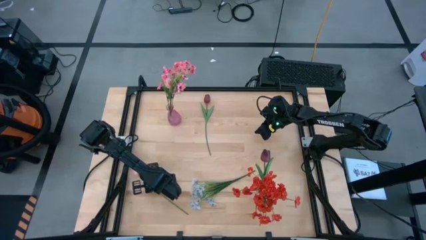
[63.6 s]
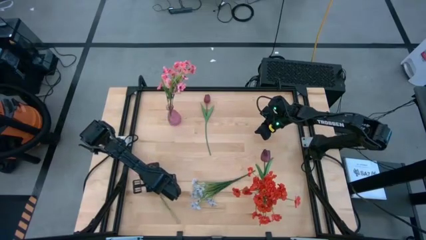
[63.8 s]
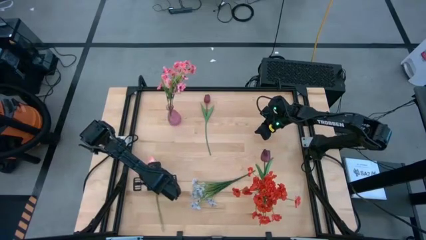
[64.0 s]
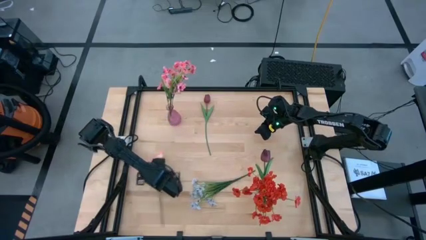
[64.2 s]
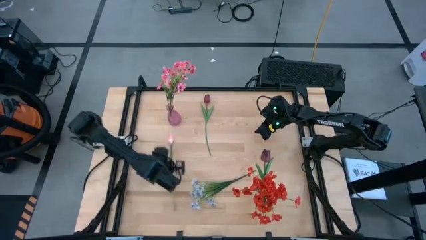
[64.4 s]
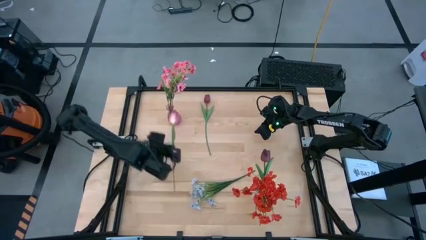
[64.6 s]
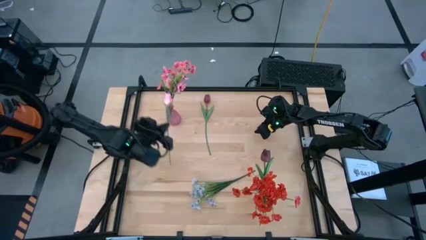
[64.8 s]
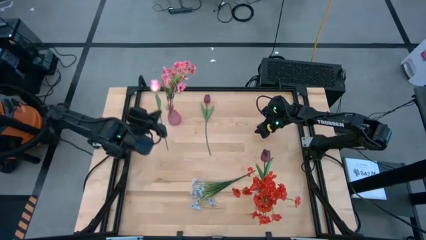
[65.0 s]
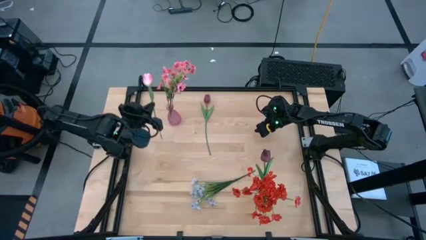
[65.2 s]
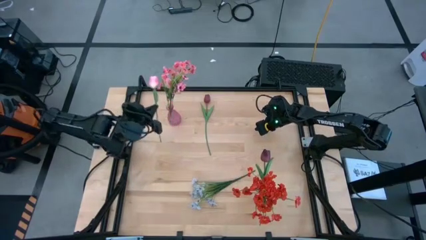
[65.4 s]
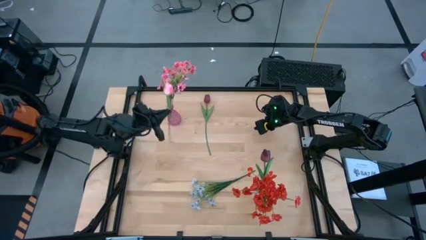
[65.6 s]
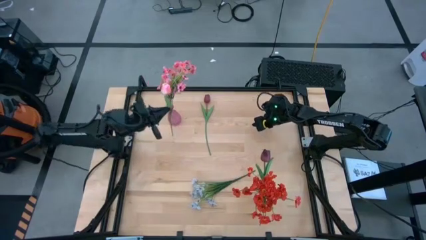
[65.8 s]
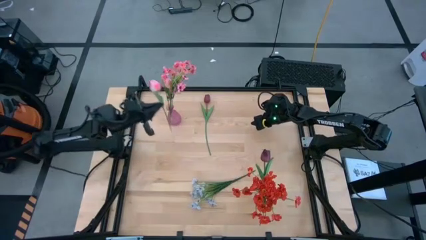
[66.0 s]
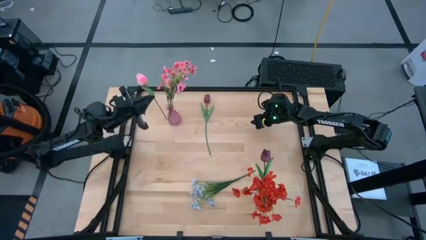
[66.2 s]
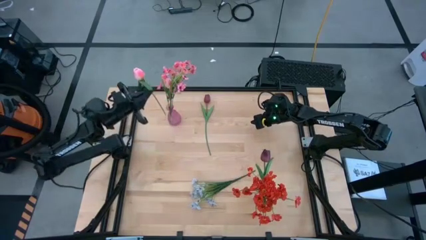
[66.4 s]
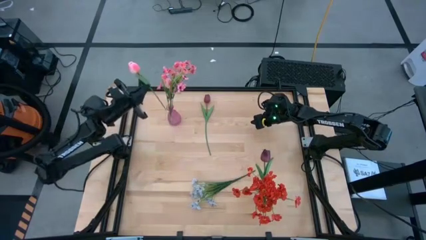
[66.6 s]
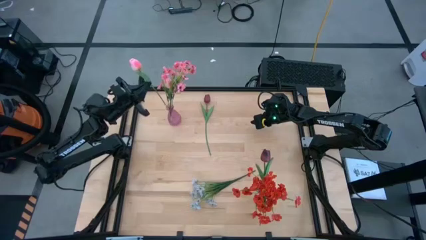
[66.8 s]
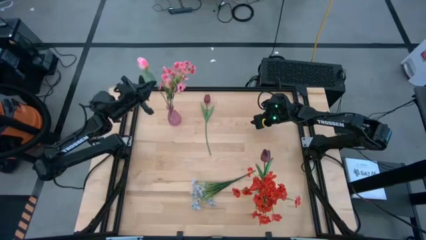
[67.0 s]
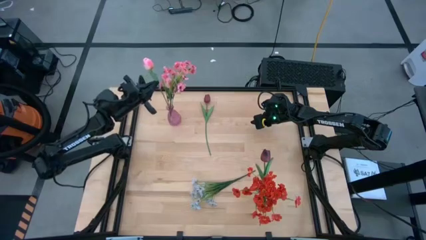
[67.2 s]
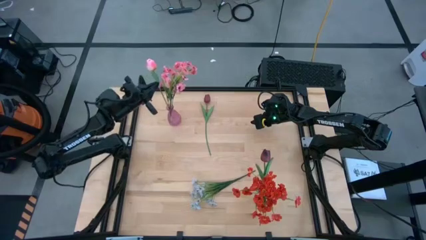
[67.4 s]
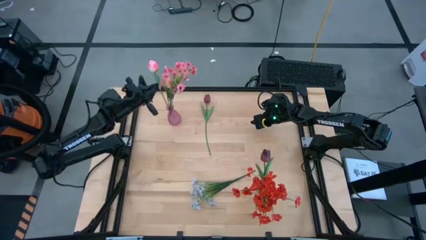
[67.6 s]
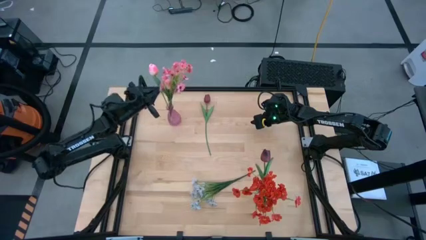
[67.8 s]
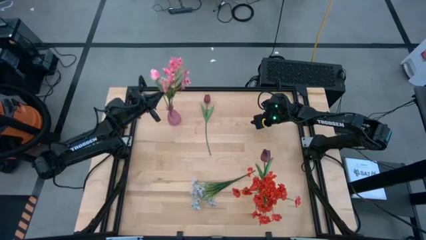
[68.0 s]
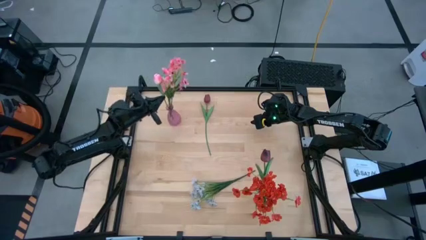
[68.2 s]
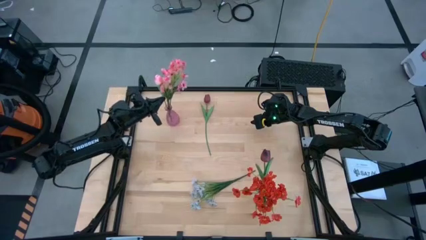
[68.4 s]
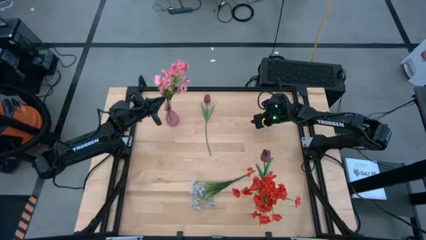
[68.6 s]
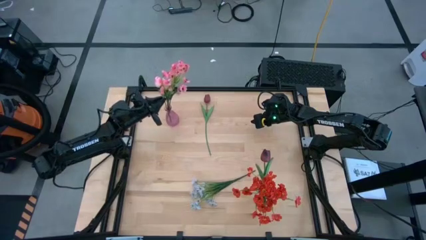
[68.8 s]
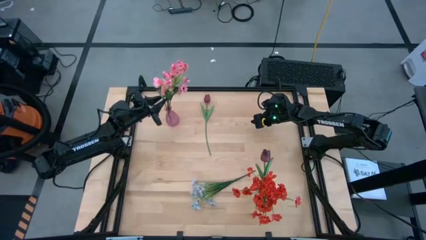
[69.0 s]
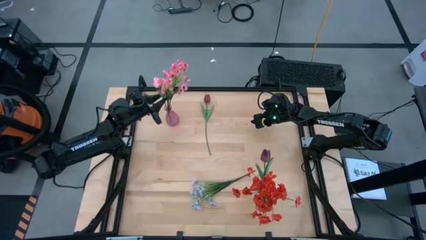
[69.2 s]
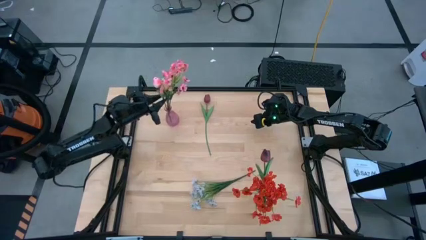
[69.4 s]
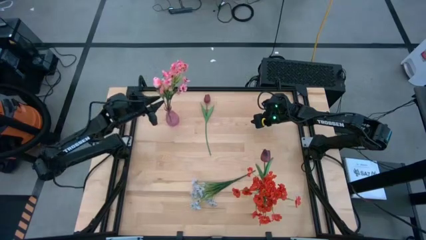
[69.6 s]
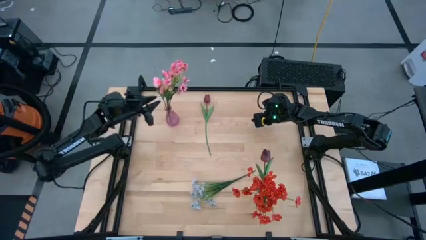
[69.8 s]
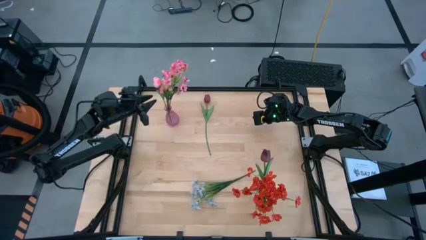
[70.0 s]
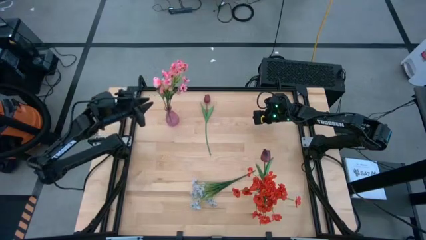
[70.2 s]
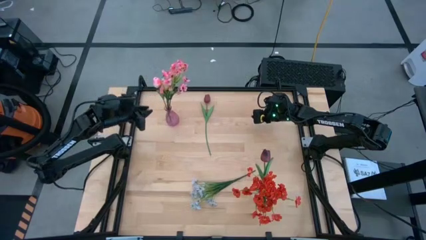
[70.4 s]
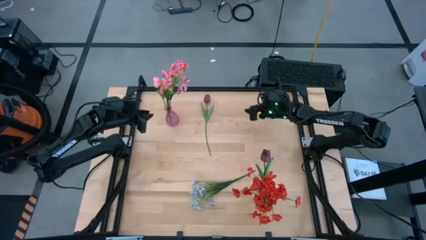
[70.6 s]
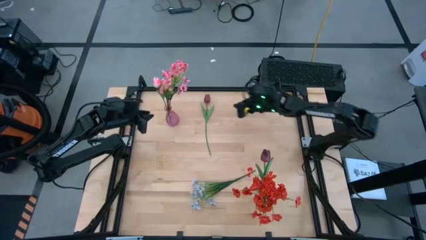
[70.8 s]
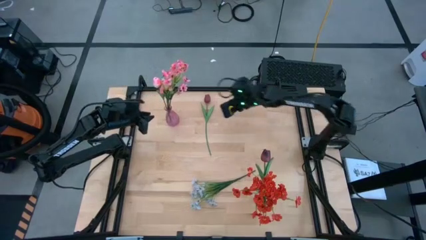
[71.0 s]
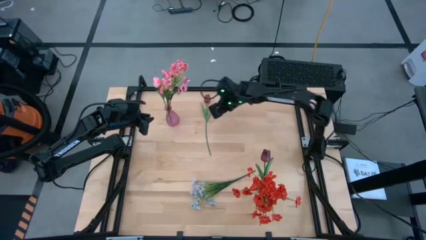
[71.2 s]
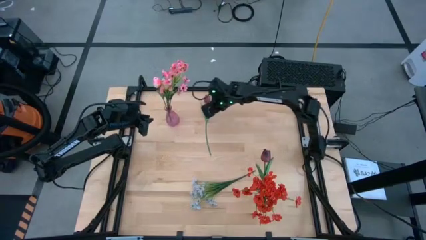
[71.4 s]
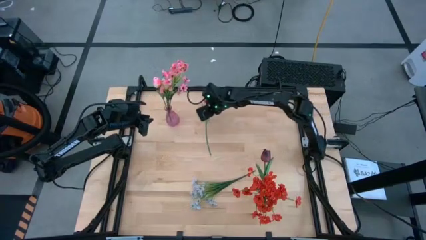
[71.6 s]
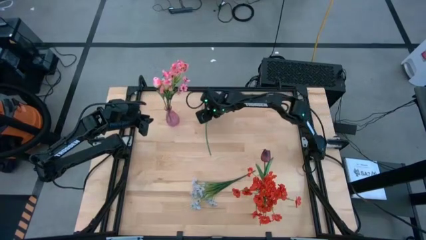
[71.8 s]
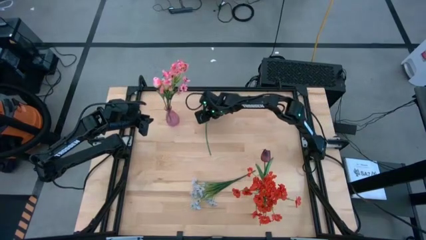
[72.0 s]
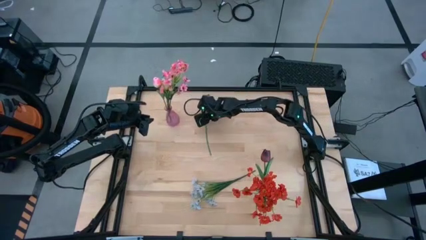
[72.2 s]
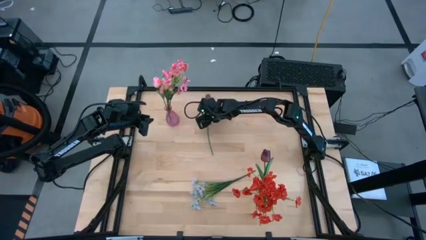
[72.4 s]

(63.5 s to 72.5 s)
Task: Sort flowers into vase by color
Put the pink tulip flower into the pink vase

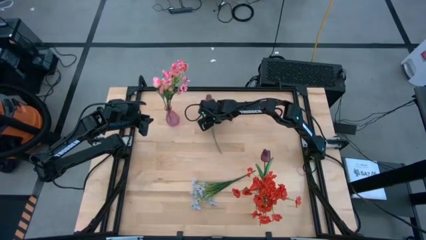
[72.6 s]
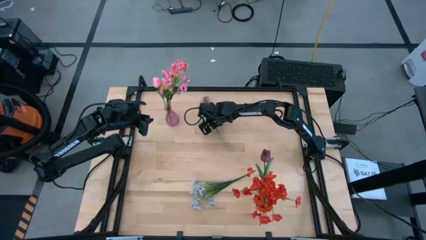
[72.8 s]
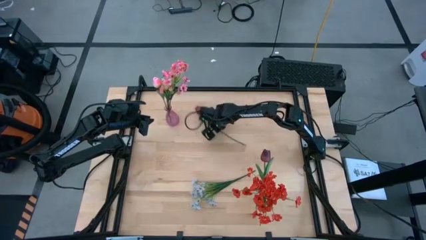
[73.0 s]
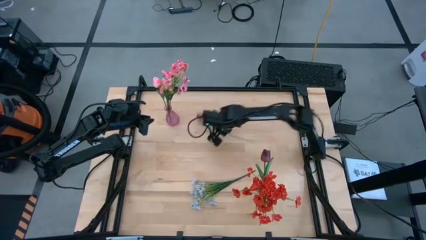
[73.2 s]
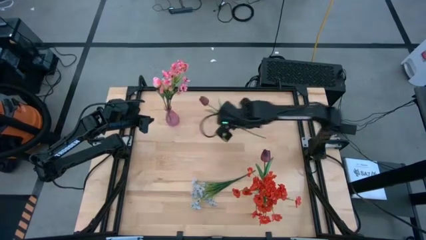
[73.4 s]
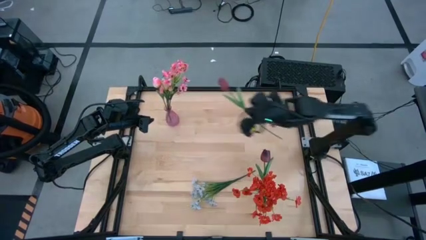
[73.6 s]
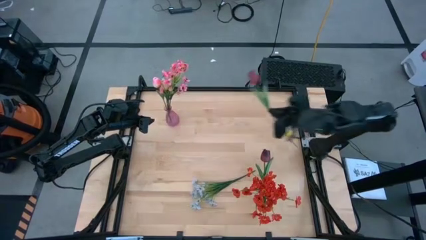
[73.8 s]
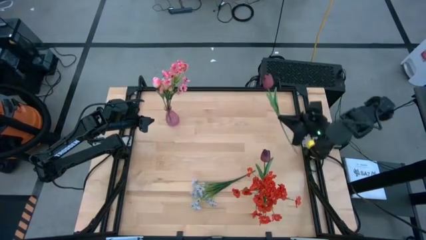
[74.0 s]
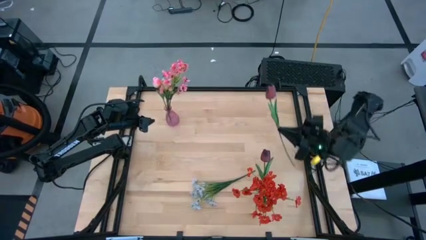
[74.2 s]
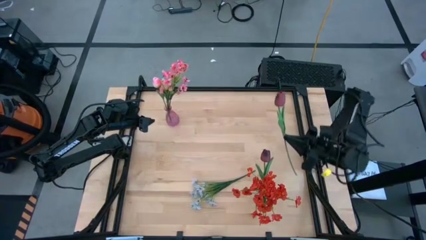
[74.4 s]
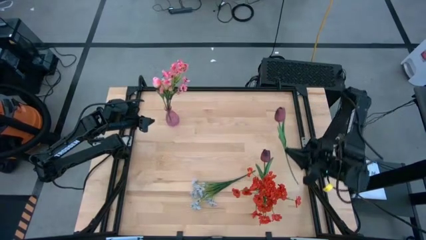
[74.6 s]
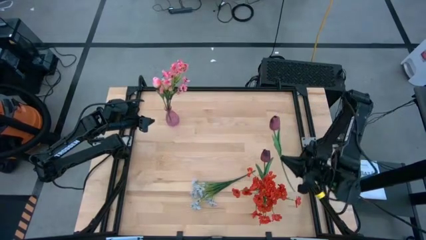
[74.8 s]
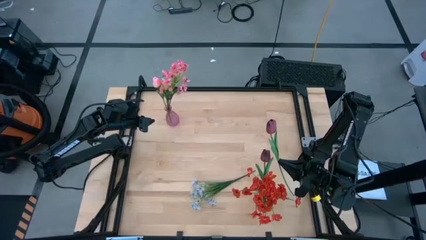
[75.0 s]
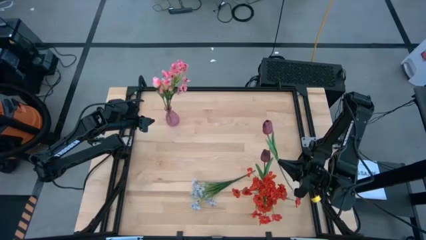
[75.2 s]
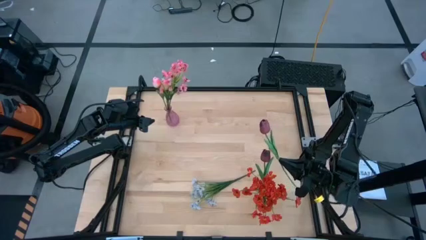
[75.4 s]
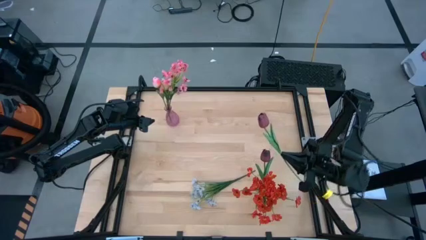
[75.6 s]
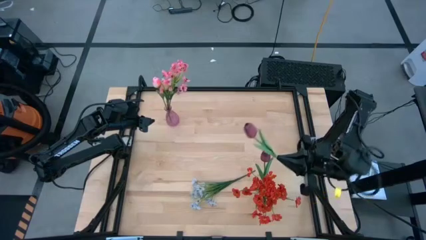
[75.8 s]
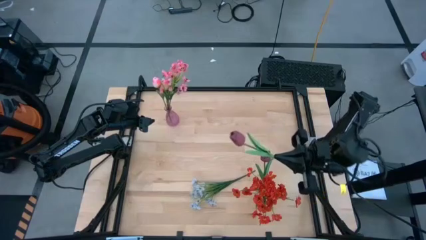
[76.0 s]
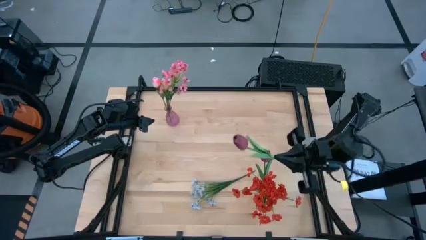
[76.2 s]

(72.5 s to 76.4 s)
Put the red tulip into the transparent vase

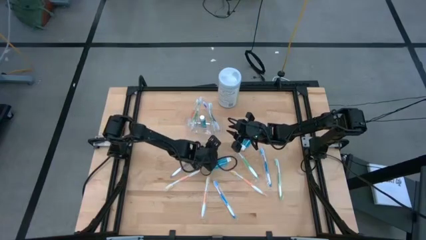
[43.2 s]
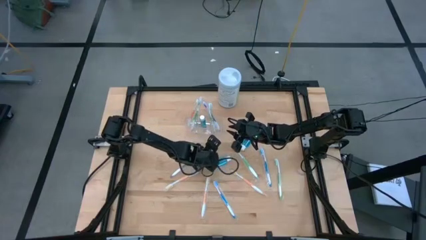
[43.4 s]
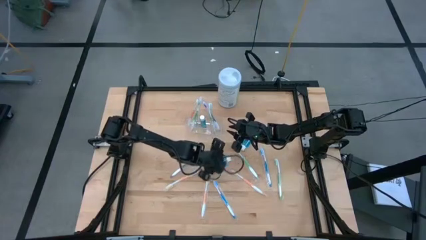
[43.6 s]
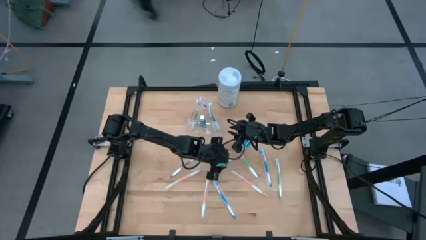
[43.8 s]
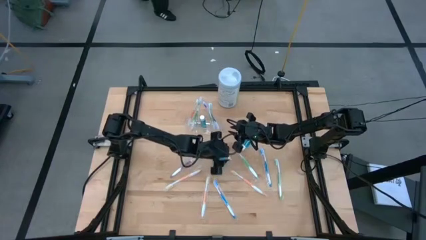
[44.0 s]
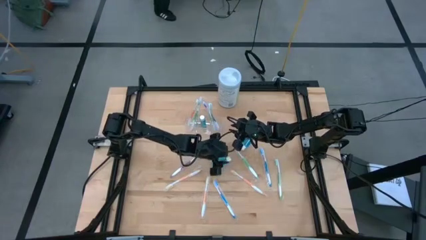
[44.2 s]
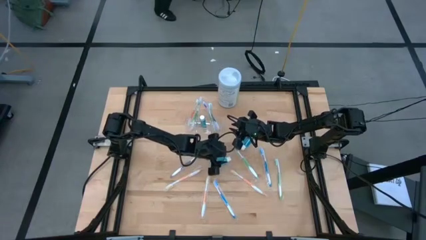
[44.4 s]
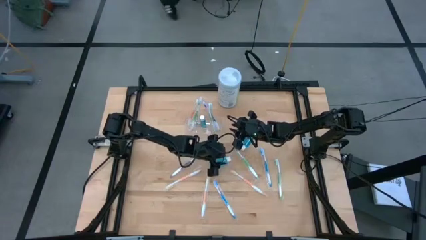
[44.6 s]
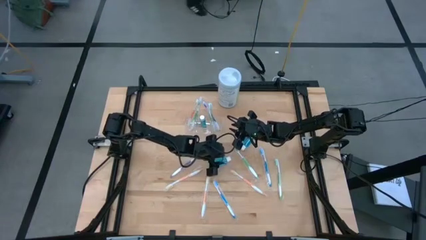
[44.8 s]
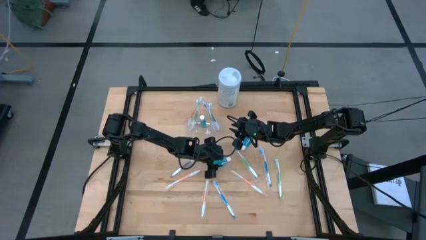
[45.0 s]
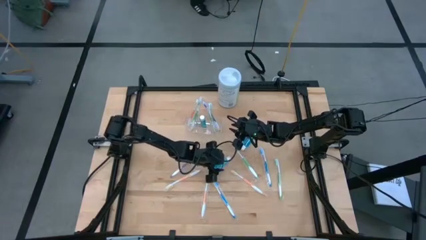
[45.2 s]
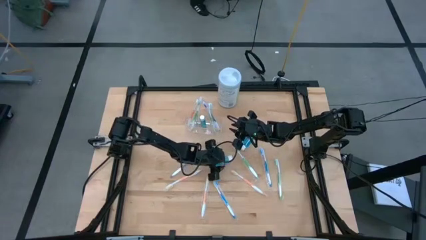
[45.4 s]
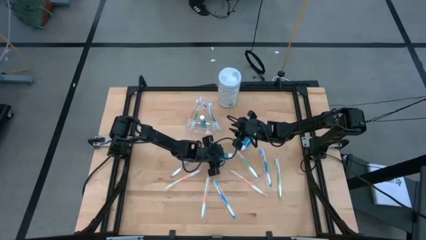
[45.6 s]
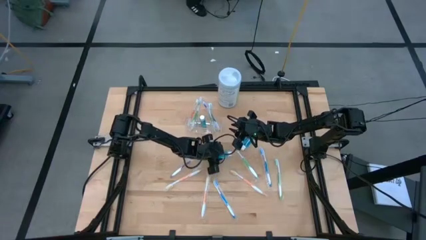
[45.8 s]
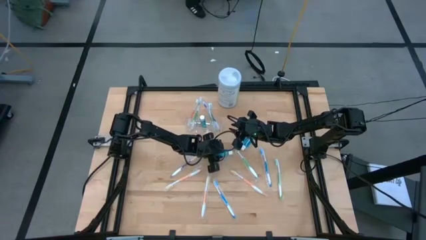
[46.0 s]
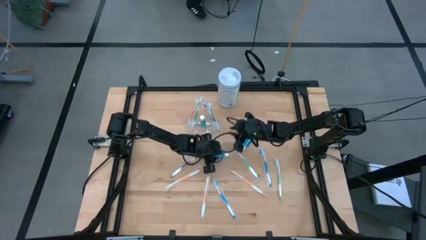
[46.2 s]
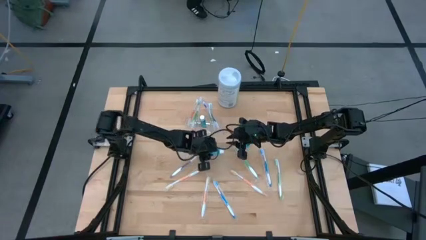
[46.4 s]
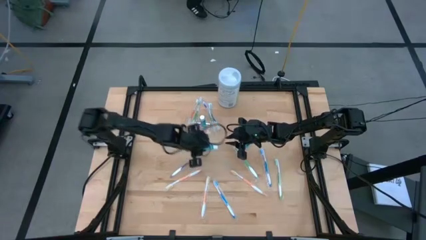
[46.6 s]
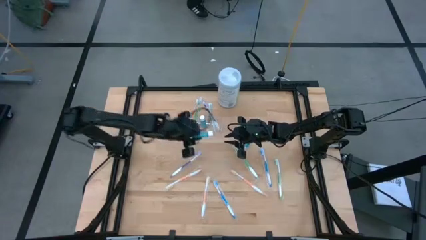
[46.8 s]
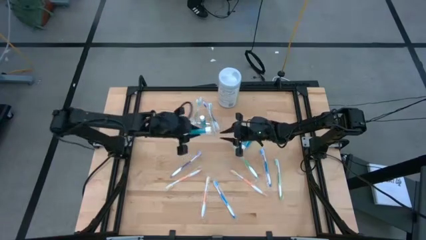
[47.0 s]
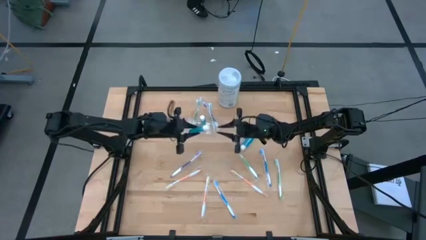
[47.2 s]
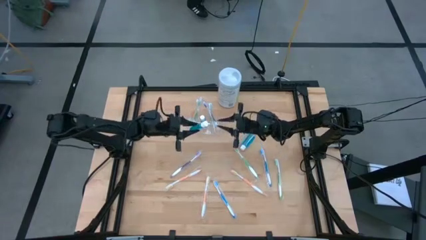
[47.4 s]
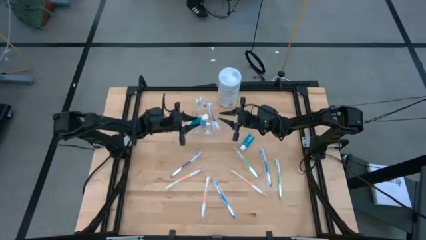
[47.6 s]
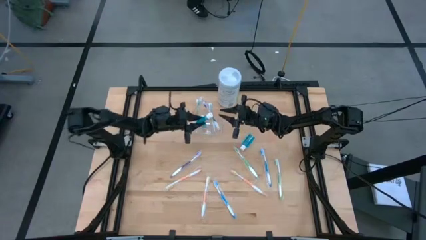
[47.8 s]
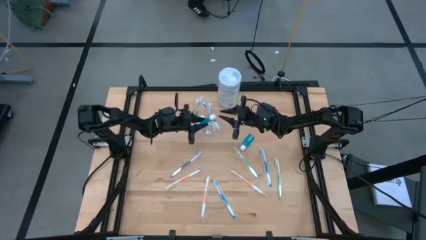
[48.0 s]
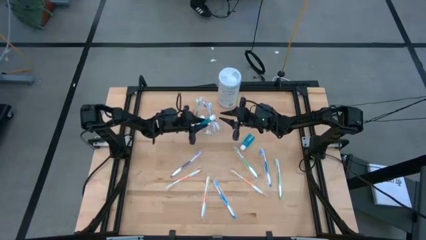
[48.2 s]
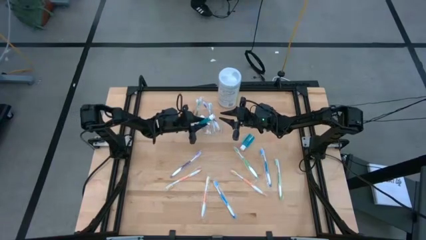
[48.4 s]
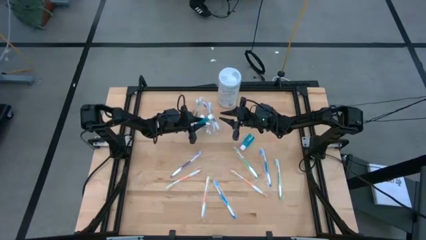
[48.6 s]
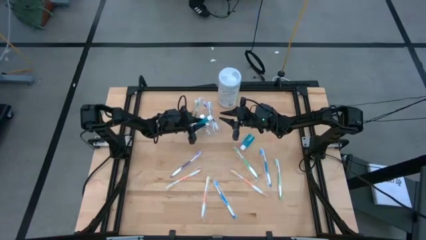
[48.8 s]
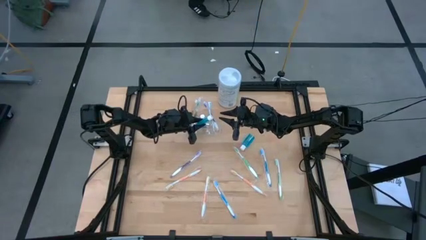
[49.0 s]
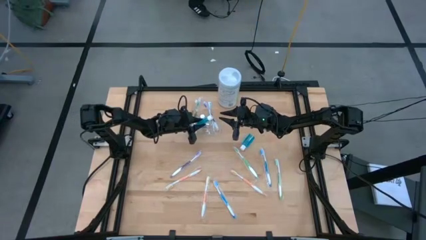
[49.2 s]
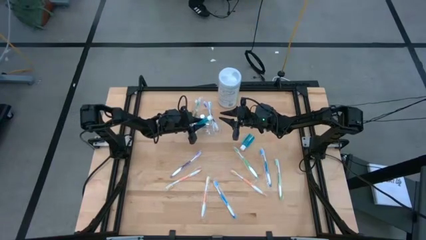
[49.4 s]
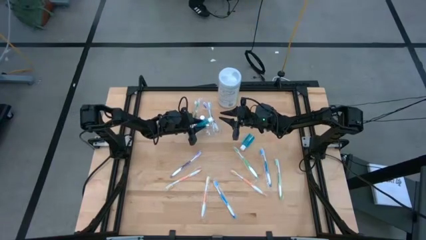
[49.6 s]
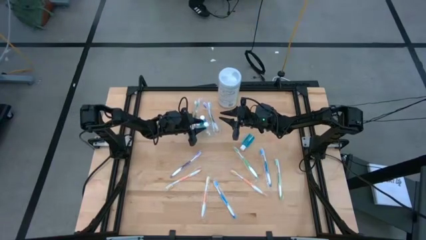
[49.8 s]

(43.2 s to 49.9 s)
Task: Pick & Place toothbrushing station
Put the blue mouthwash into the transparent organizer
